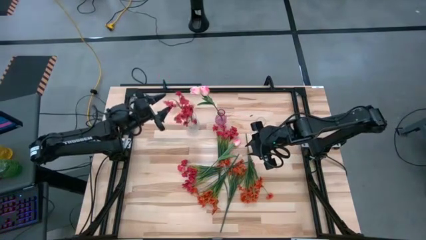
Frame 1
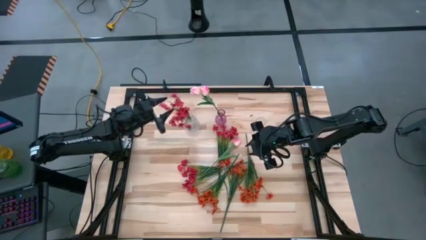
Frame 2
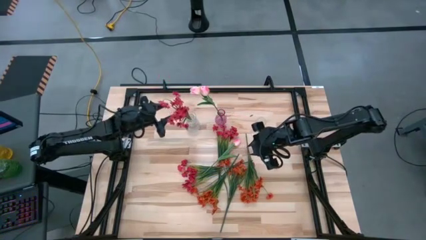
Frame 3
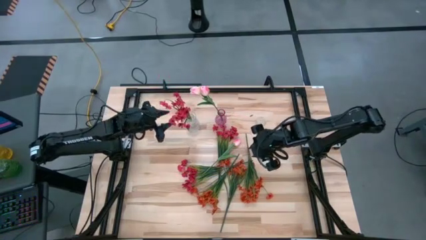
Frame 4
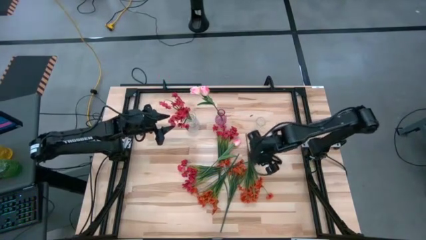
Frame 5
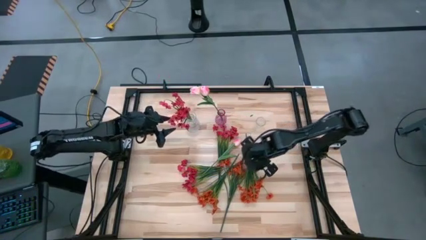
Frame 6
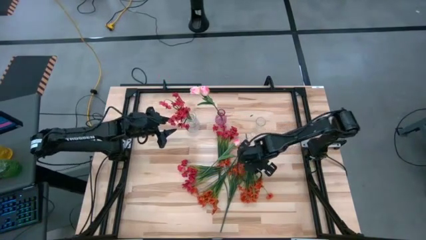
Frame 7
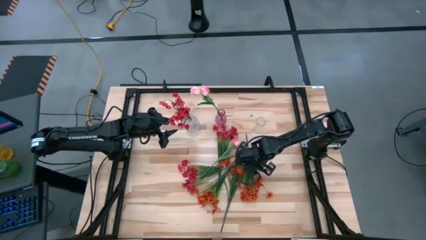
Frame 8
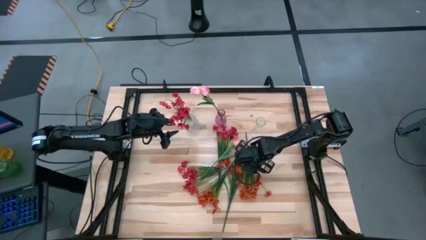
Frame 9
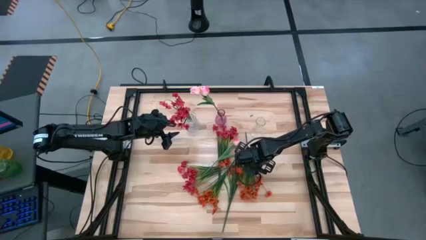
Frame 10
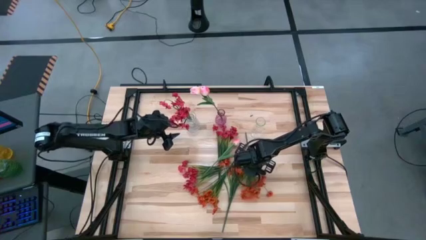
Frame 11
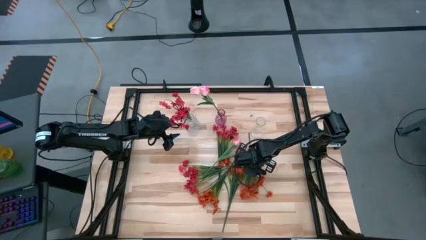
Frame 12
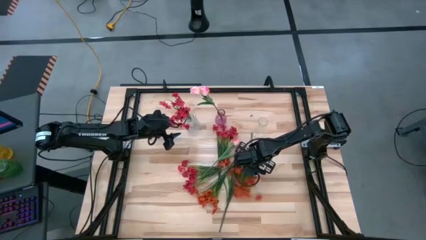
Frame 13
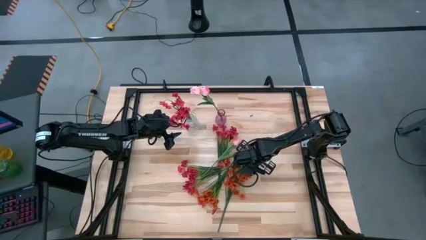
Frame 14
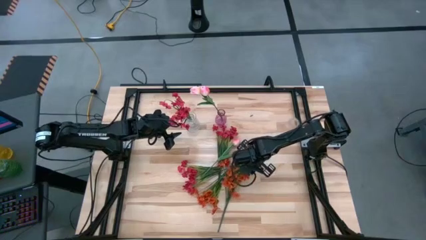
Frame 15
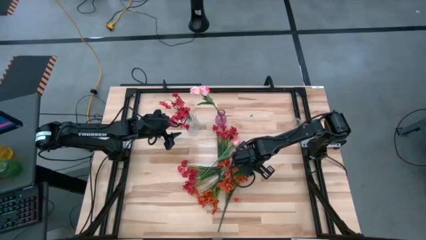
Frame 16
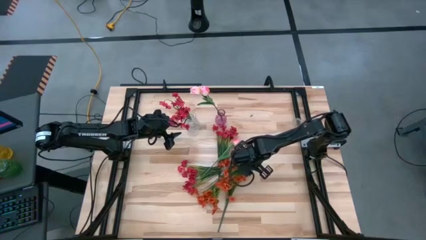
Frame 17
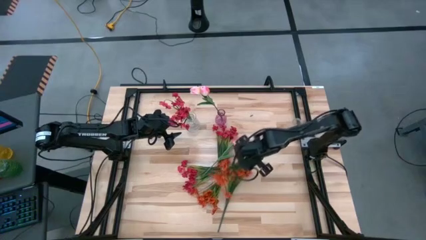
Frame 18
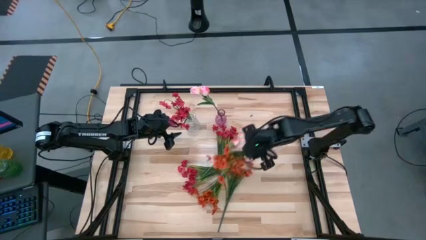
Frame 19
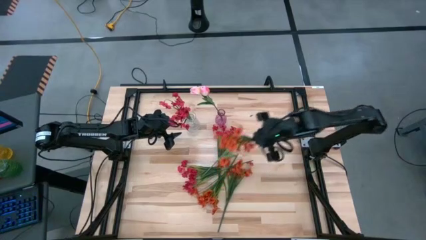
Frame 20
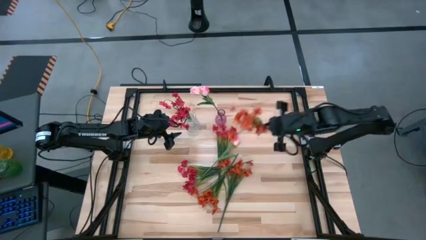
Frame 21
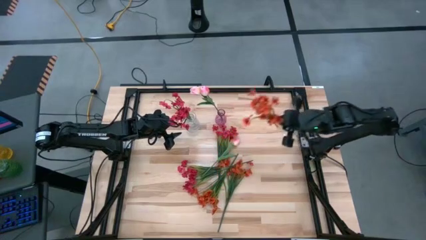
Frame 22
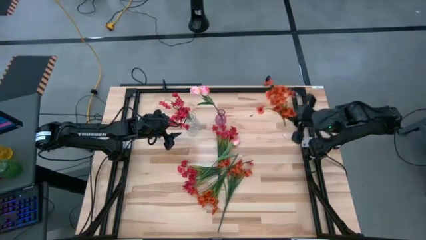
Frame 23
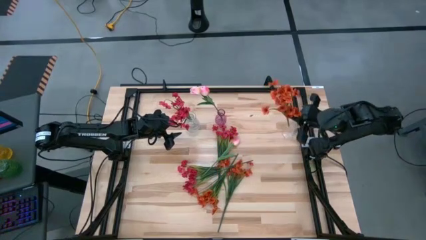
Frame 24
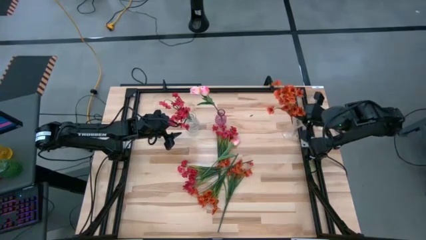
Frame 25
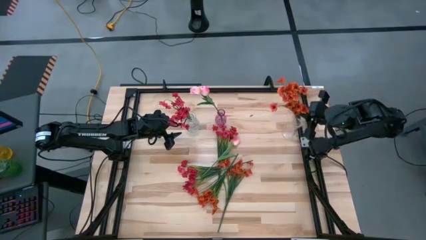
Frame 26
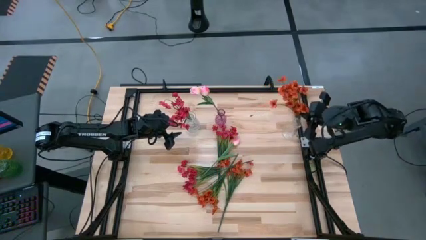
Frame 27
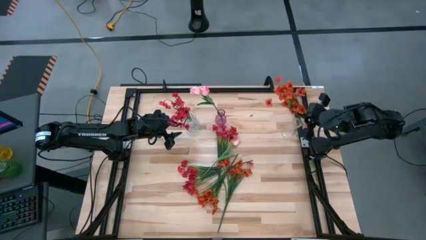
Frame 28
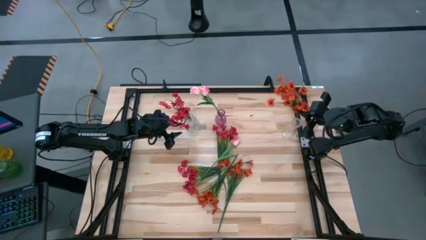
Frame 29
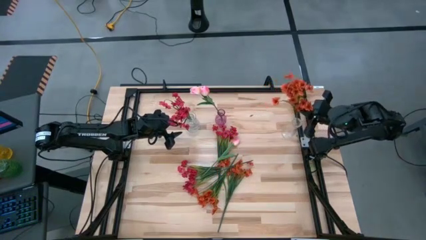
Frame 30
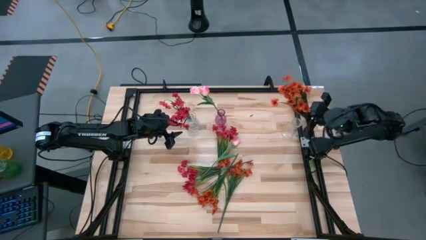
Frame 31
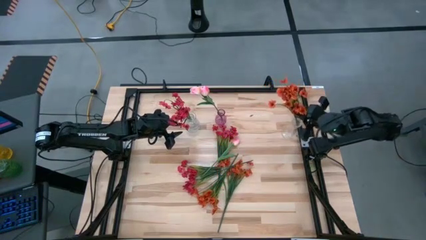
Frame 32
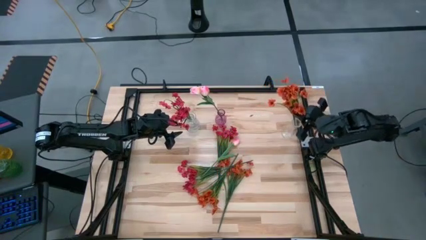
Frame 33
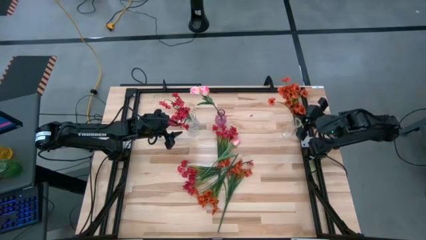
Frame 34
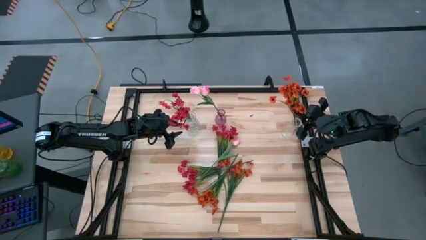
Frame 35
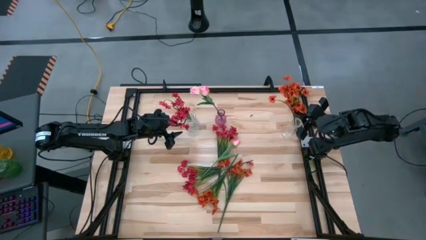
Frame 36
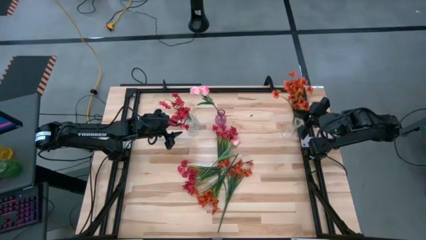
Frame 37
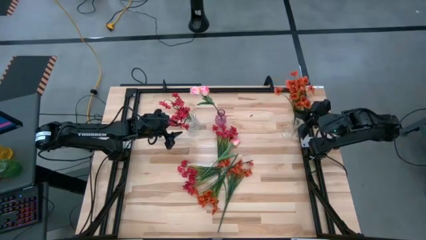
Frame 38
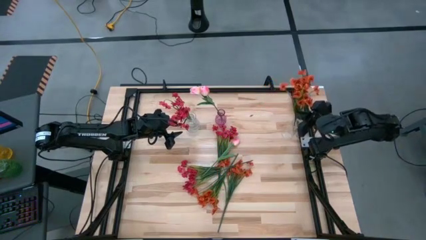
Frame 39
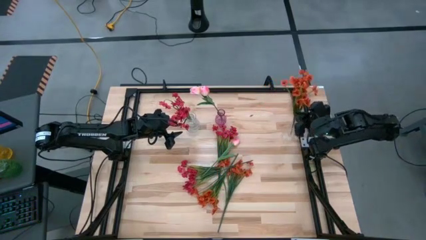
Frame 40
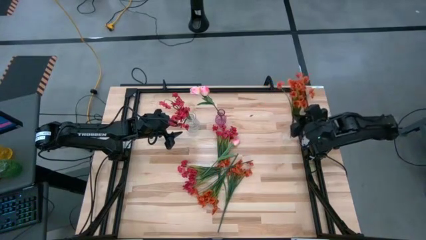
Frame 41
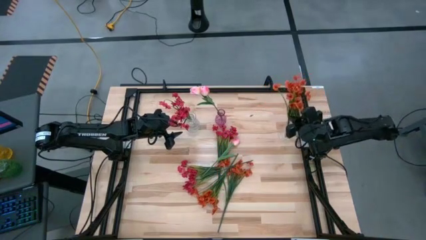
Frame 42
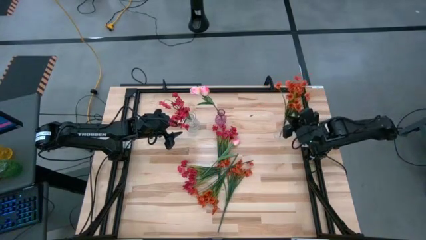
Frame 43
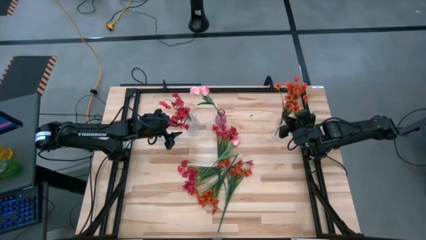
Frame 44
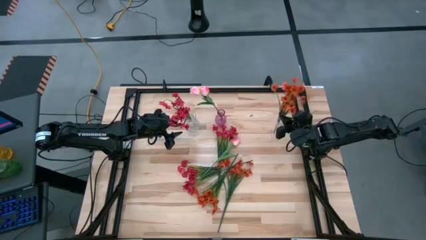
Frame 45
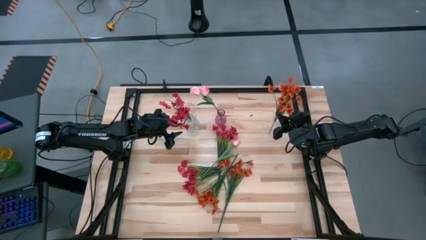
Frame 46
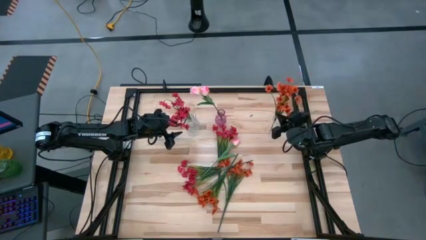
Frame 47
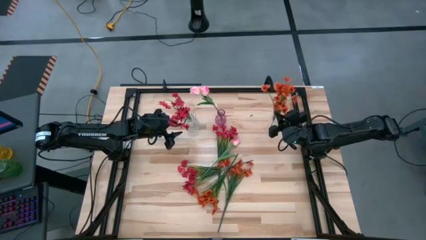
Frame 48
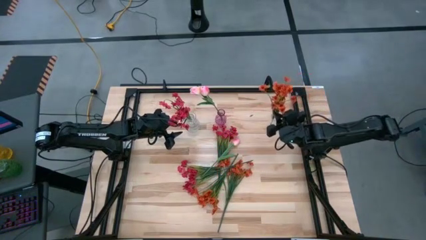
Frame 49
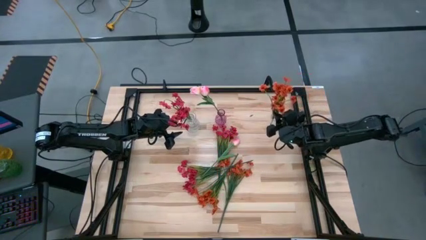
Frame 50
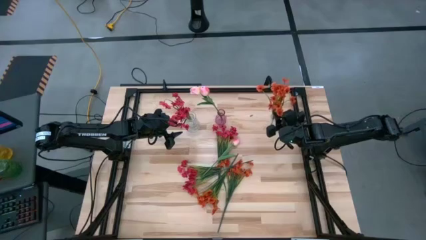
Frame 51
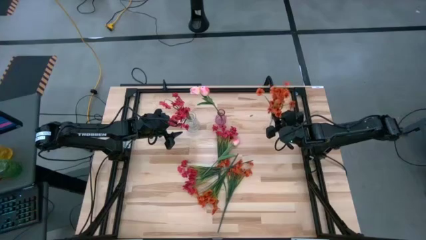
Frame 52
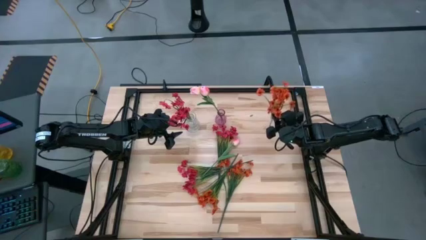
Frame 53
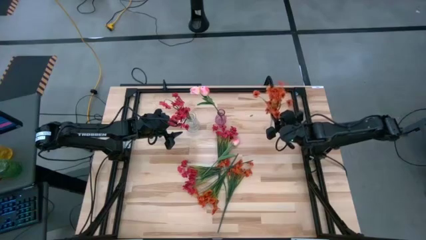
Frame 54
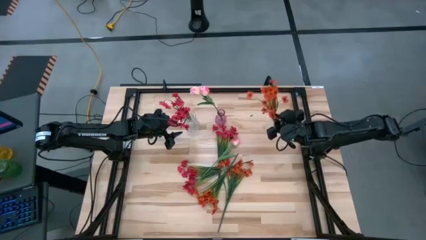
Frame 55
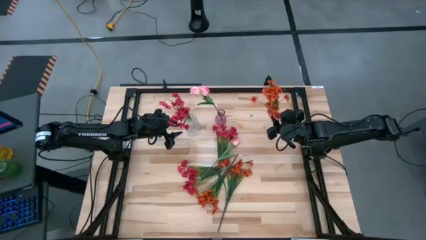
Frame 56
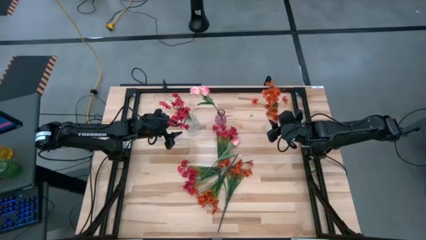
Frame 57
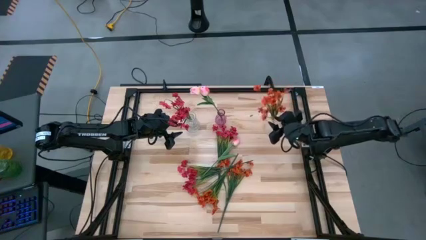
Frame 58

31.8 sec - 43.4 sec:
Task: Sort flowers into vase by color
Put the right orange flowers into the right transparent vase

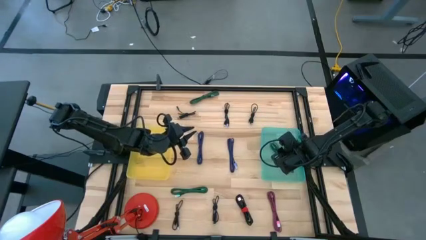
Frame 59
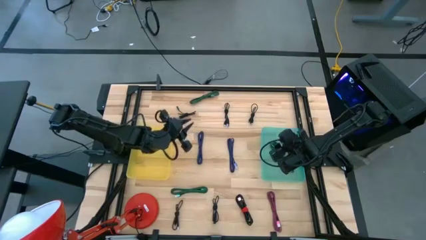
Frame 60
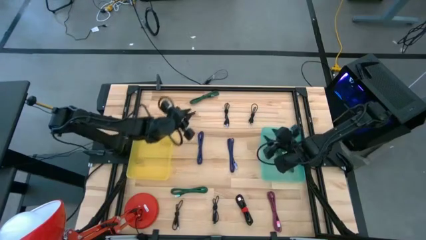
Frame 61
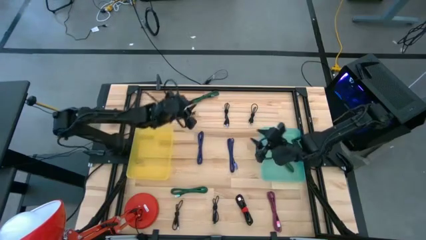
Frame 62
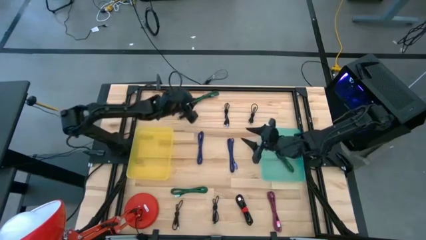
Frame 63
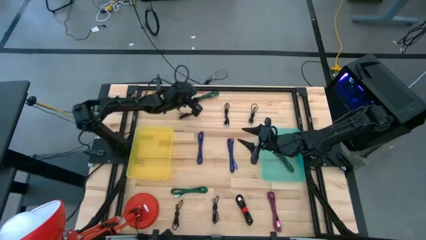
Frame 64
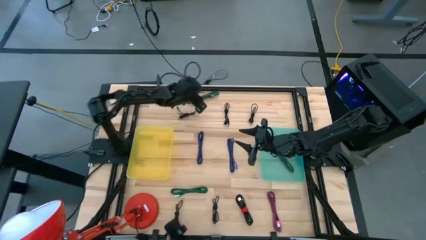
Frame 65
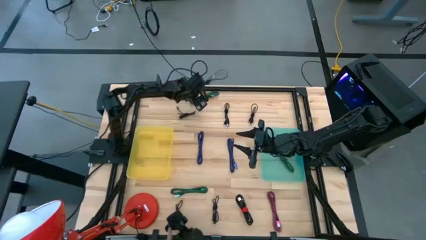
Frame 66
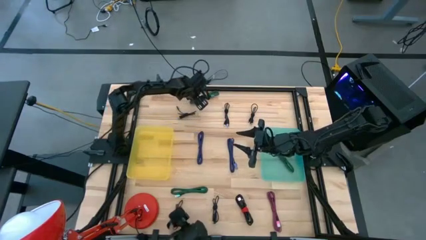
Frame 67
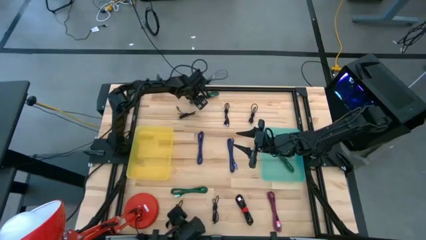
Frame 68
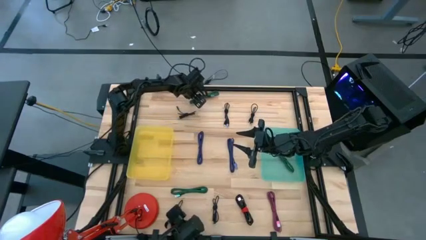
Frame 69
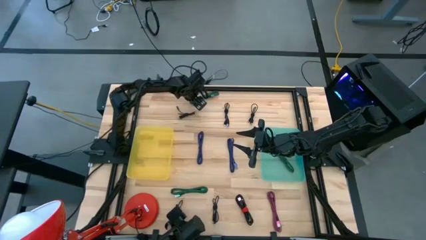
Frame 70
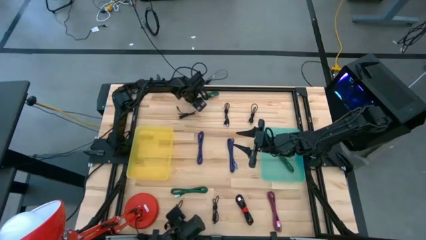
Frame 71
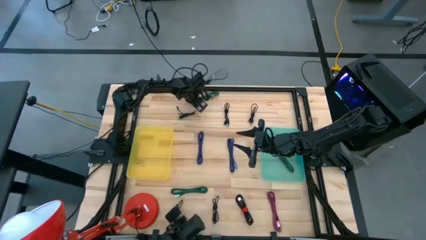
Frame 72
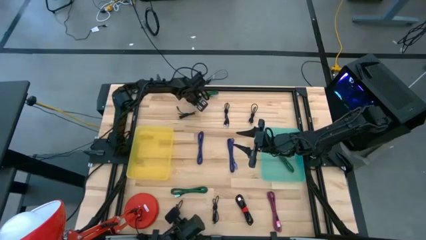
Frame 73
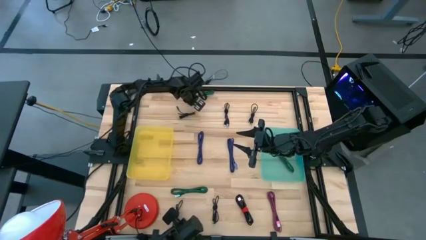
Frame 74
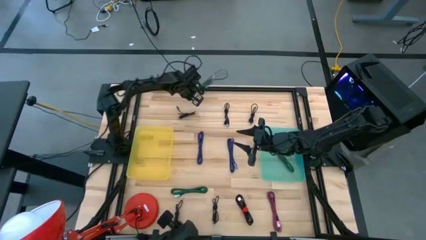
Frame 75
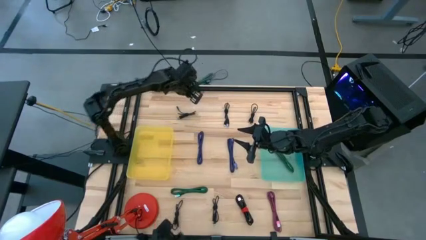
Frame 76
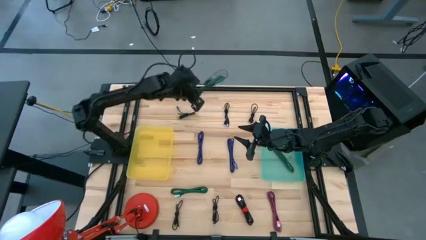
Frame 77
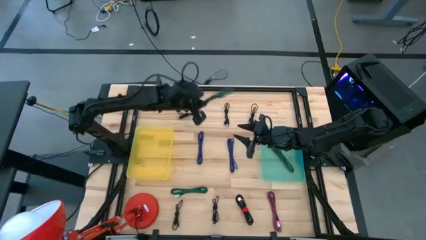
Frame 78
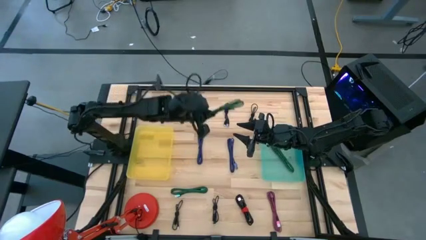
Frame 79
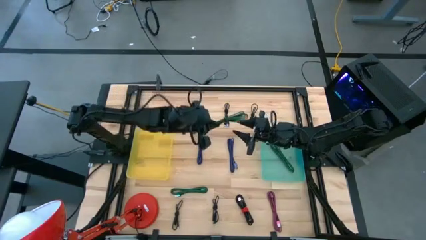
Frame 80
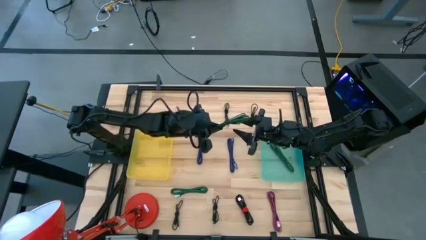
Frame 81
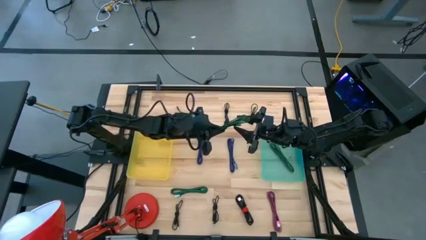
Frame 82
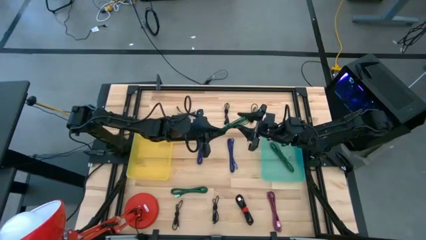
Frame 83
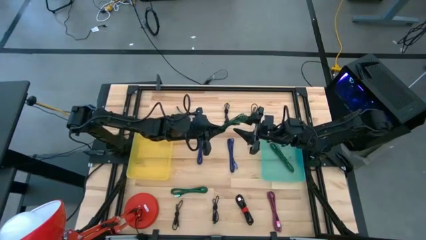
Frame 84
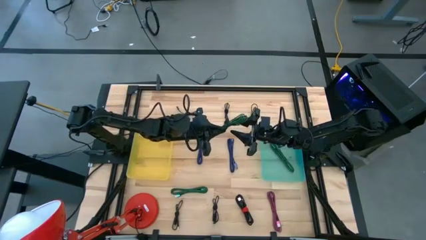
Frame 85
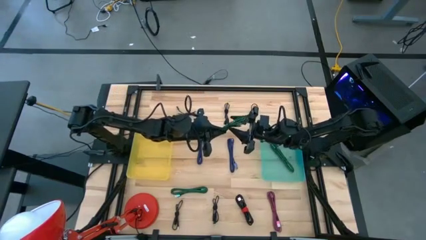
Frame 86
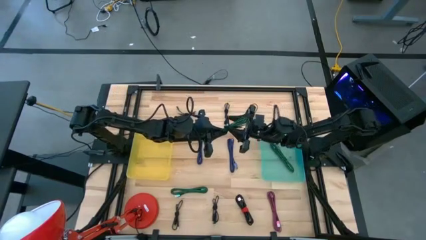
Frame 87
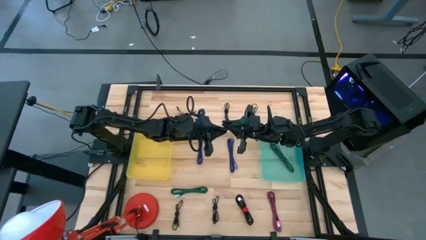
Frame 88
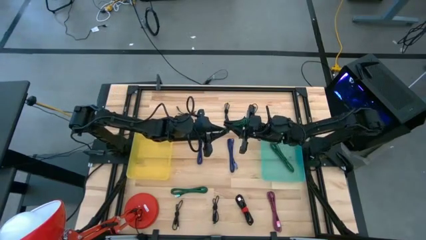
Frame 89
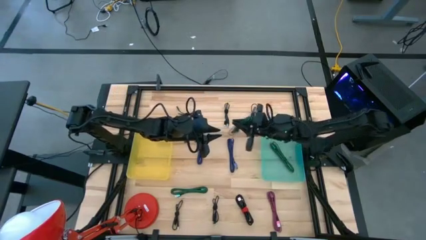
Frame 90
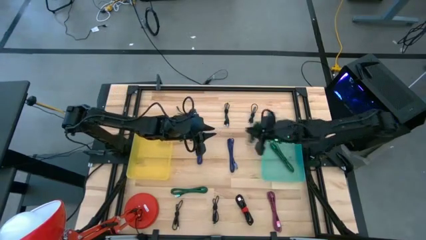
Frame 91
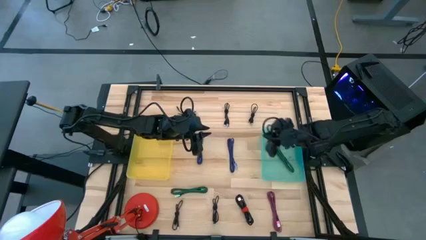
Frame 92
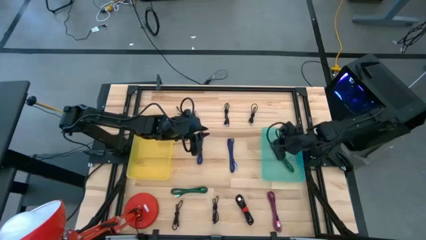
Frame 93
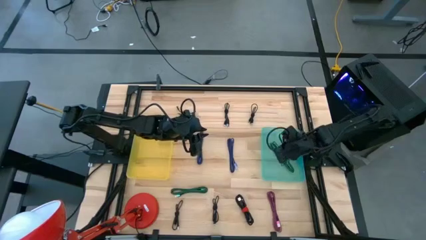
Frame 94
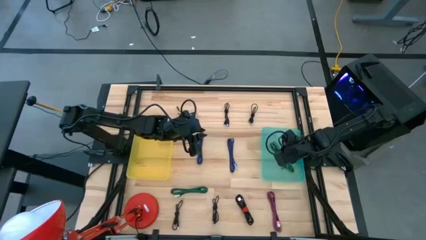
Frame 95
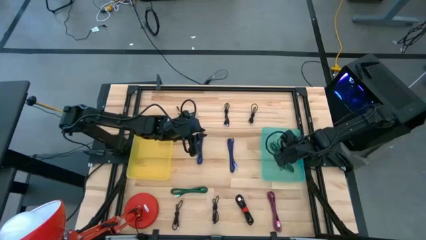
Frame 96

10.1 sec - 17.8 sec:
Task: Pick & Place USB Port
Put the top green and black charger cable into the light green bin
